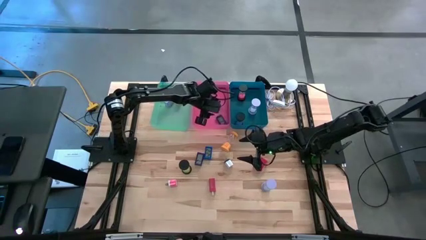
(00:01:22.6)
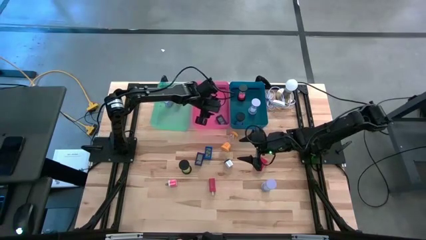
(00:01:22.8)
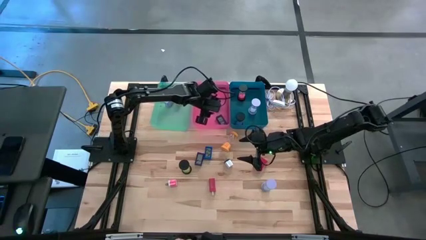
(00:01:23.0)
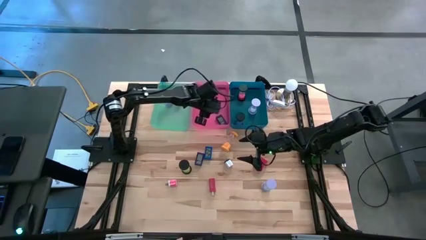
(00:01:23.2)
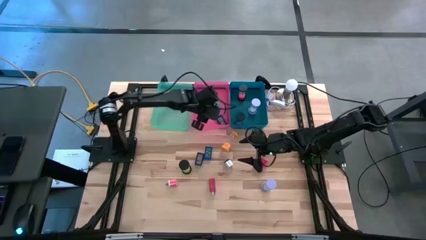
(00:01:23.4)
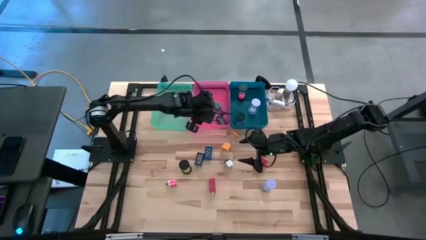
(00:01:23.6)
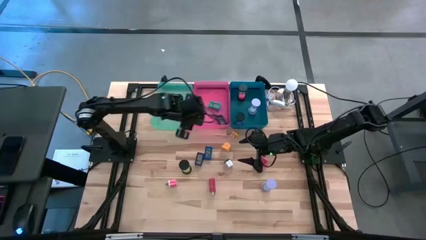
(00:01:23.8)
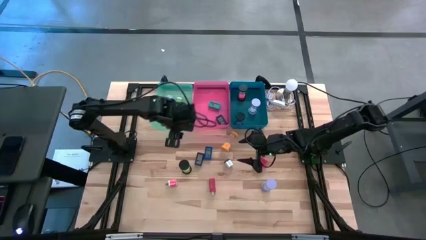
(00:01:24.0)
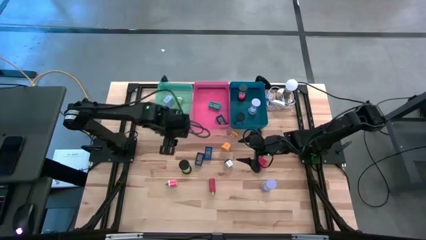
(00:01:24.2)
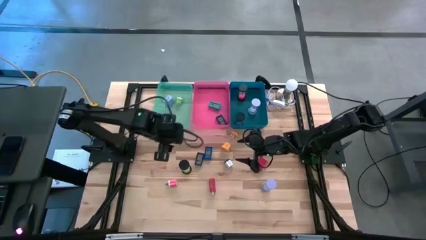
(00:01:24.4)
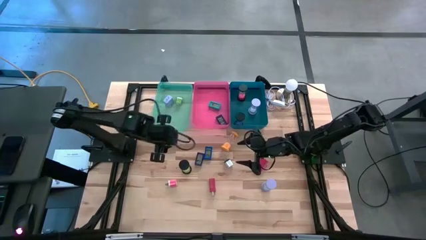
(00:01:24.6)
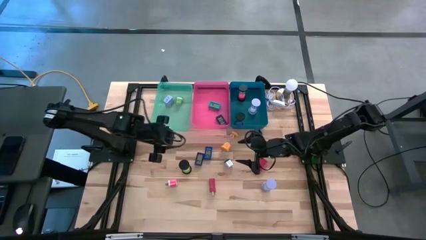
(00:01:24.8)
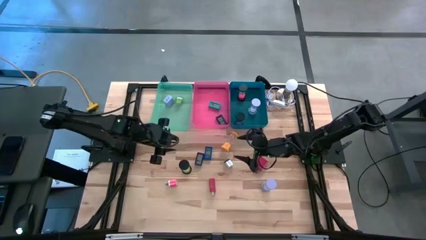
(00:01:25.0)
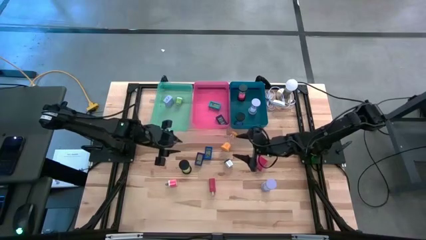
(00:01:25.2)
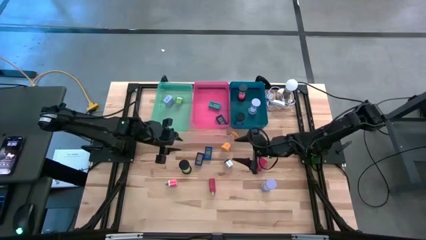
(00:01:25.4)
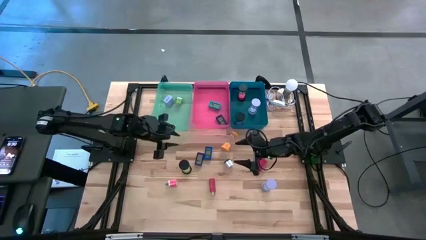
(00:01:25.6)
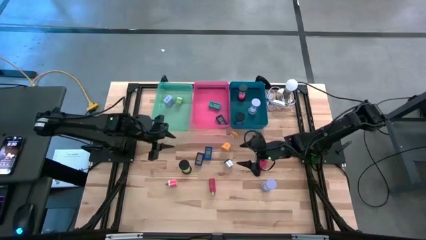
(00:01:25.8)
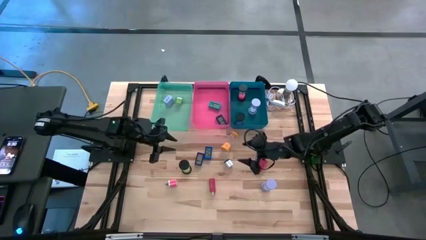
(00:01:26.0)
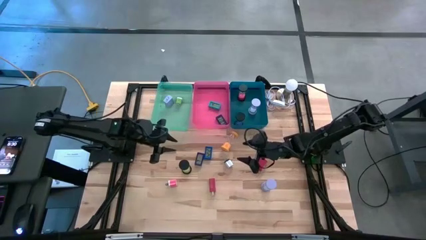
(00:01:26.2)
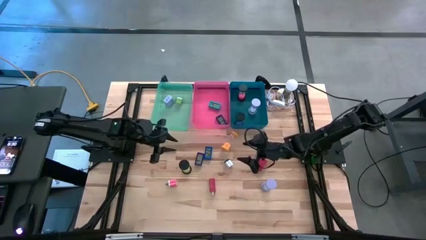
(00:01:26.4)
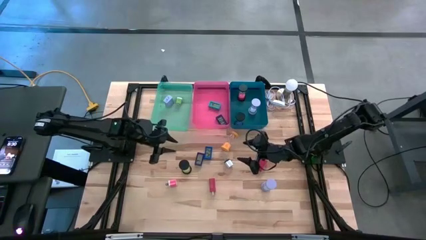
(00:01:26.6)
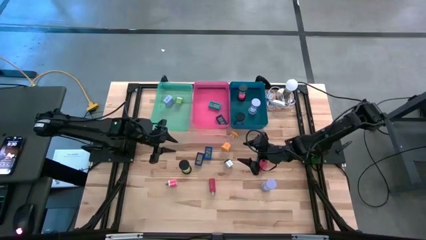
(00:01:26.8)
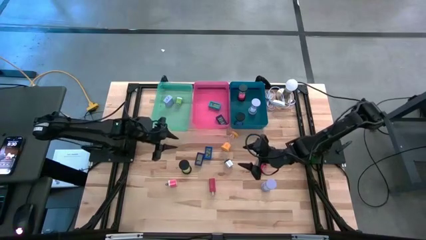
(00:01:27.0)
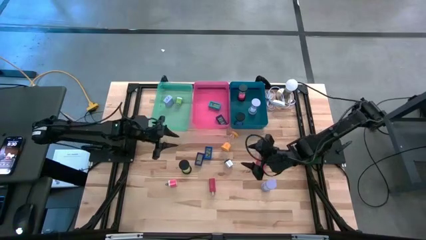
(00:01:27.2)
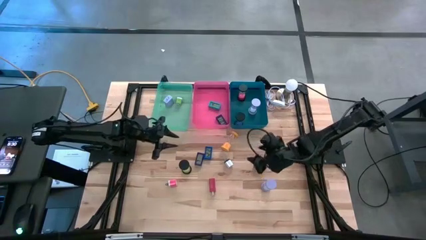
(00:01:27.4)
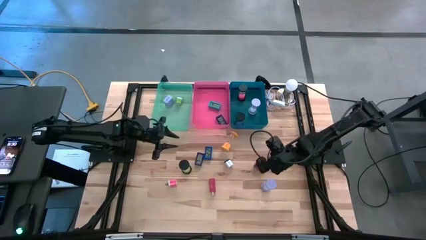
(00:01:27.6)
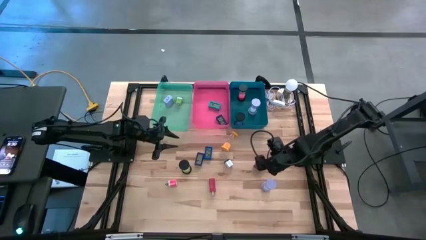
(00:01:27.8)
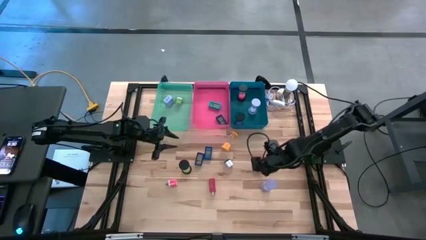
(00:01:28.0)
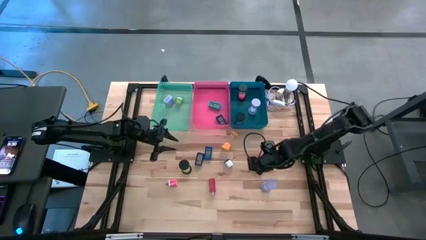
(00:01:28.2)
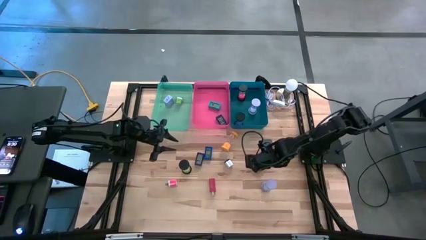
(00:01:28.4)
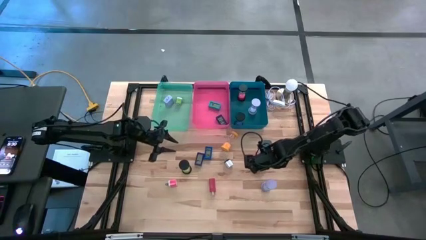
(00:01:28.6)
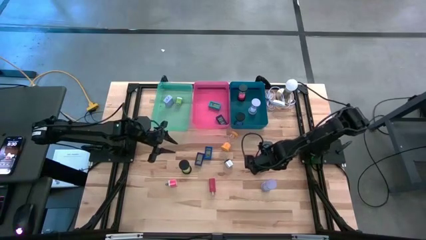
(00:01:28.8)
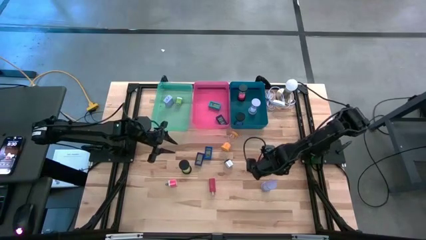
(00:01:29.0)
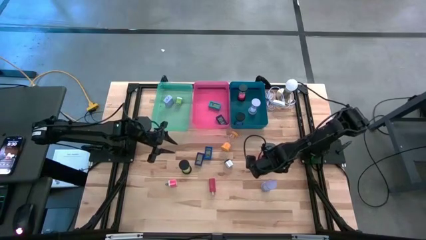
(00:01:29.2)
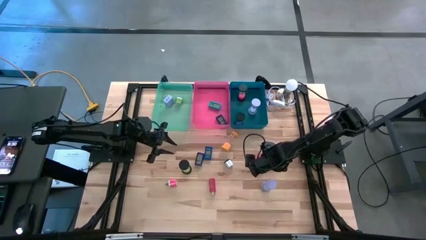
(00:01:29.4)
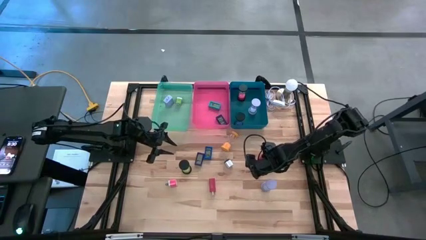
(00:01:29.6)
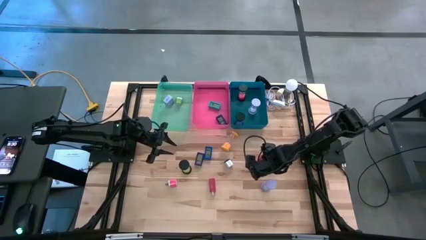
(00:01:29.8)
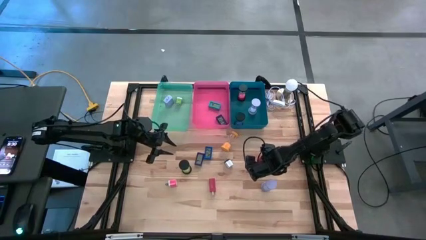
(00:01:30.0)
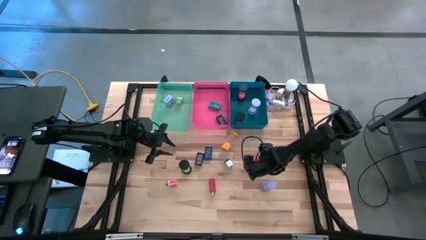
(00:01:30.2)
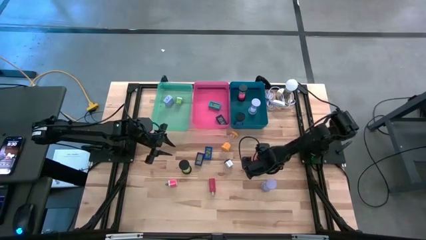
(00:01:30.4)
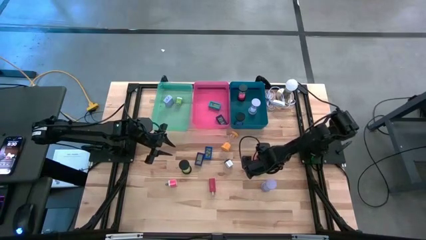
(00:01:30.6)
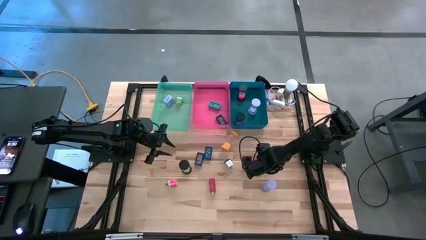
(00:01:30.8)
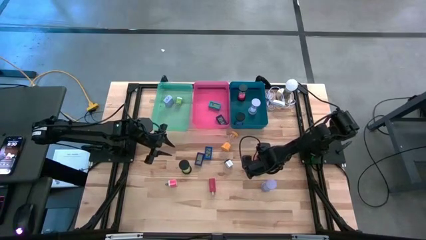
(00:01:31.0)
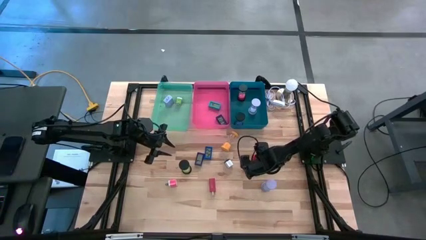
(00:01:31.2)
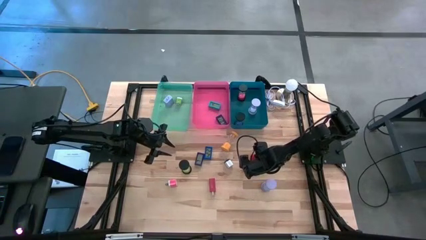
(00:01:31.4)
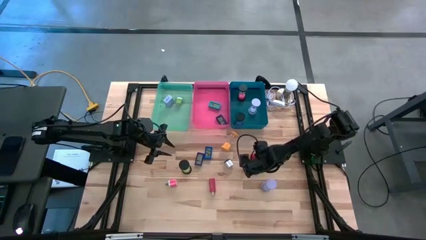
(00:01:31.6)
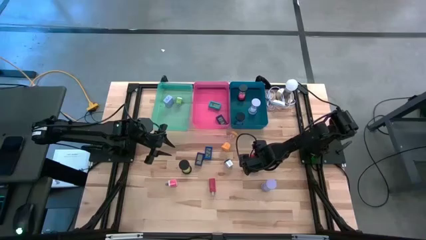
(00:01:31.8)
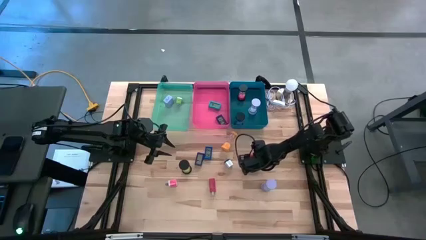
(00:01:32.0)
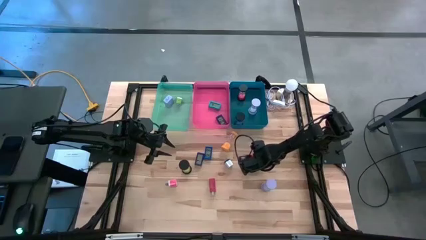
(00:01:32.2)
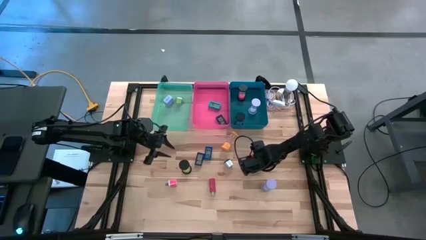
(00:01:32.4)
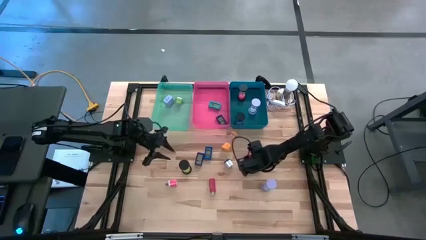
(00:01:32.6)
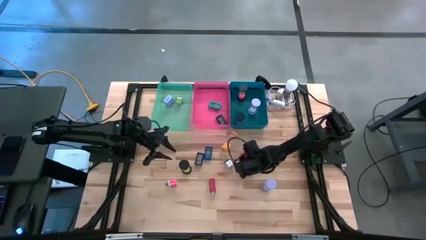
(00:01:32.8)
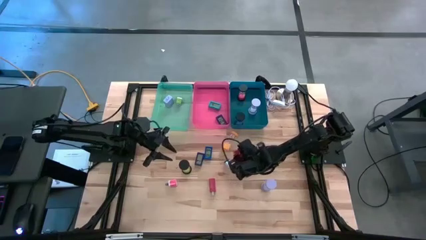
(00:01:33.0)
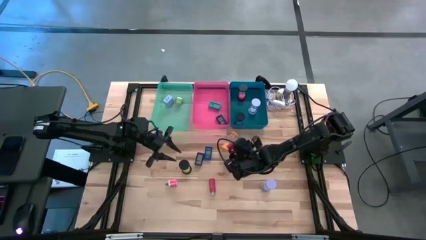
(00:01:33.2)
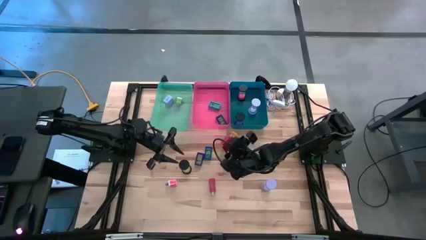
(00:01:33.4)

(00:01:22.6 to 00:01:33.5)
Task: Pick & Place Office items
Put the right red adapter into the green bin

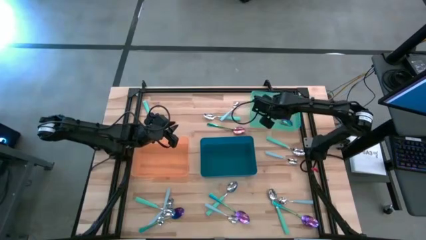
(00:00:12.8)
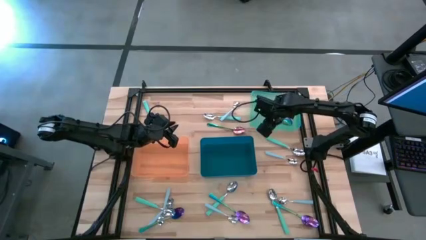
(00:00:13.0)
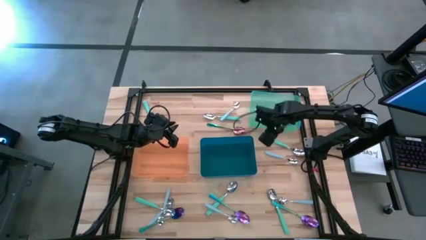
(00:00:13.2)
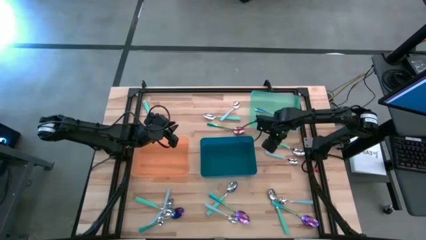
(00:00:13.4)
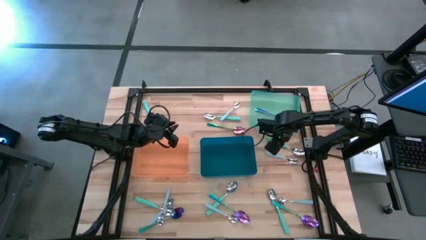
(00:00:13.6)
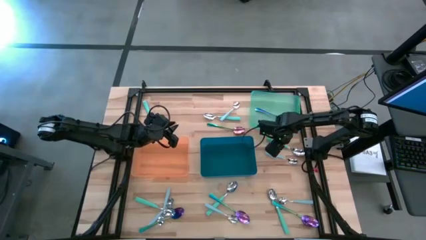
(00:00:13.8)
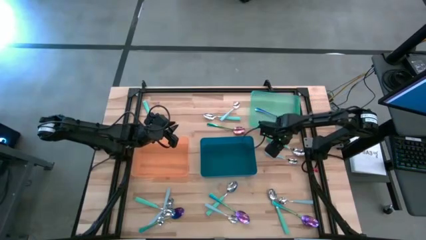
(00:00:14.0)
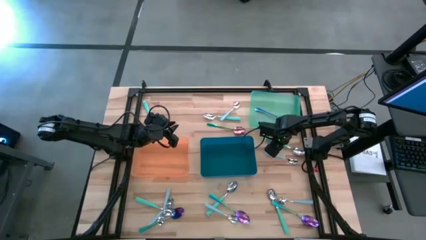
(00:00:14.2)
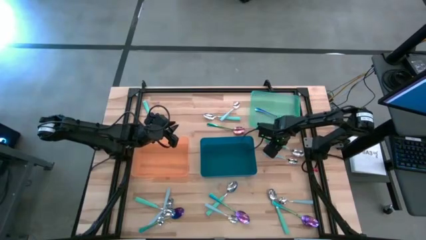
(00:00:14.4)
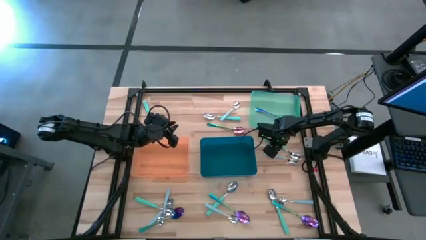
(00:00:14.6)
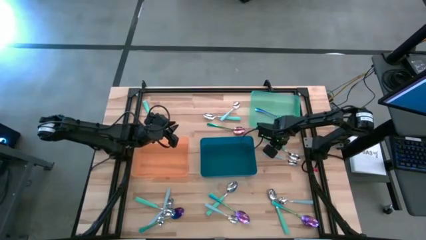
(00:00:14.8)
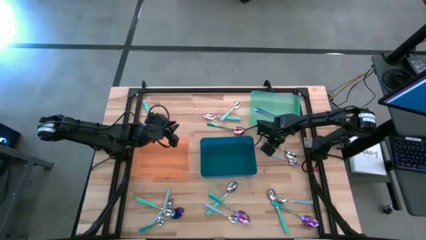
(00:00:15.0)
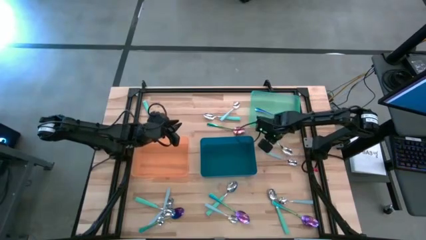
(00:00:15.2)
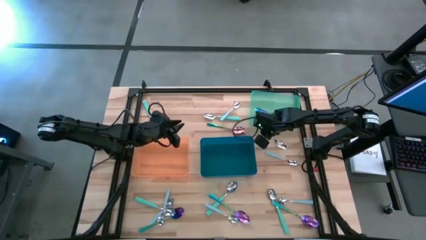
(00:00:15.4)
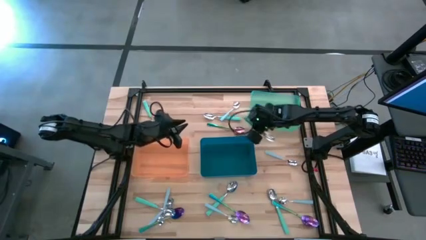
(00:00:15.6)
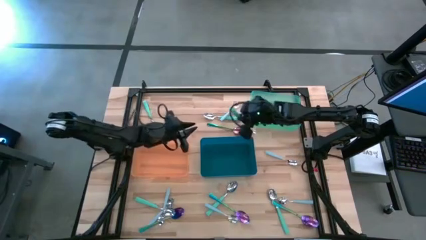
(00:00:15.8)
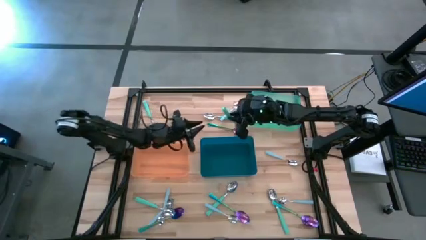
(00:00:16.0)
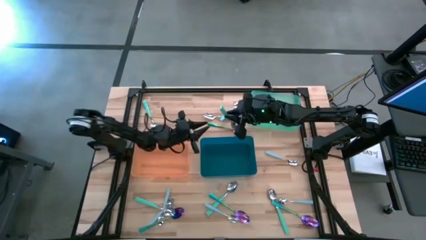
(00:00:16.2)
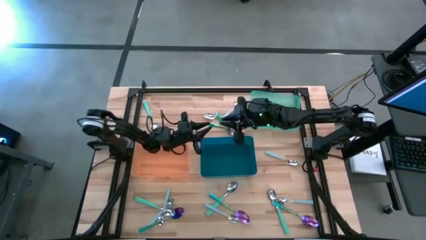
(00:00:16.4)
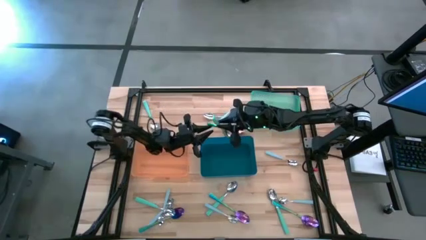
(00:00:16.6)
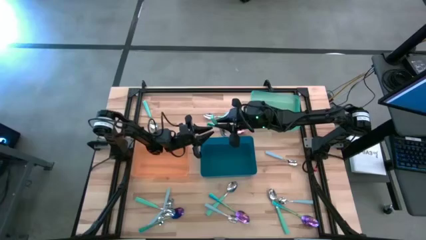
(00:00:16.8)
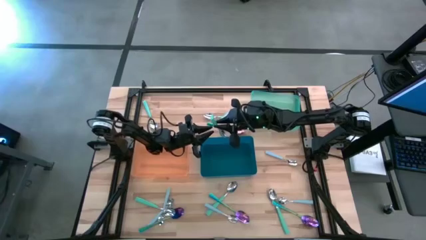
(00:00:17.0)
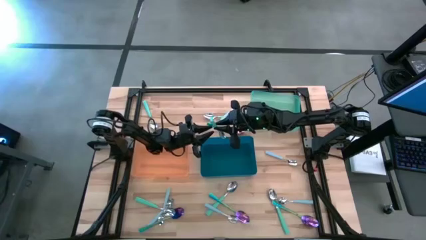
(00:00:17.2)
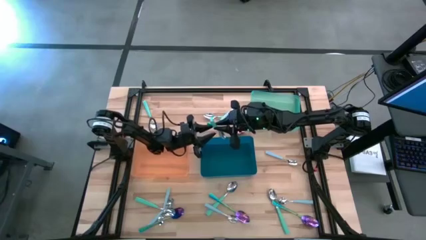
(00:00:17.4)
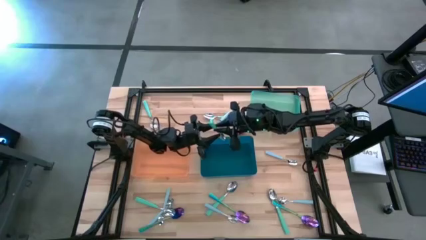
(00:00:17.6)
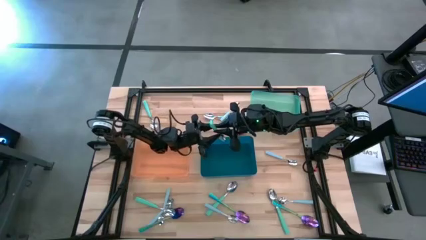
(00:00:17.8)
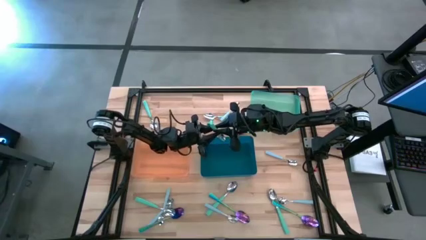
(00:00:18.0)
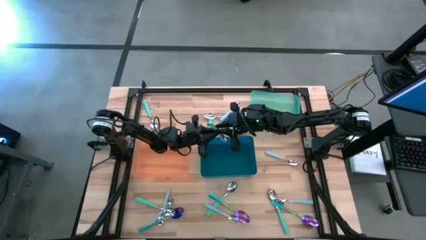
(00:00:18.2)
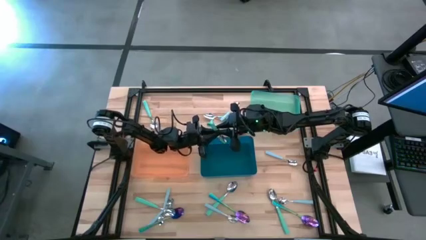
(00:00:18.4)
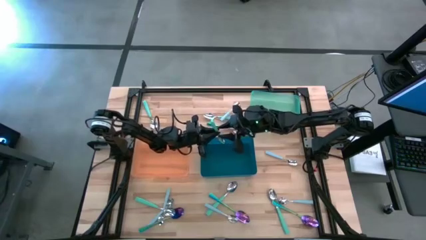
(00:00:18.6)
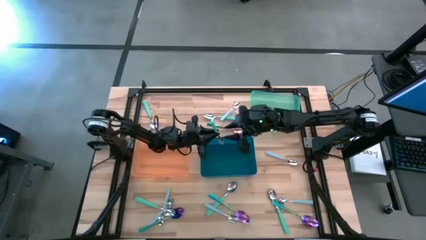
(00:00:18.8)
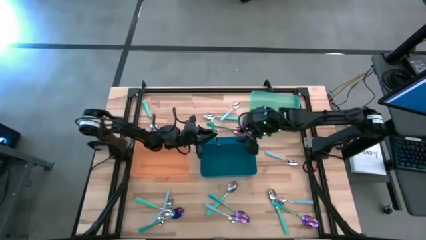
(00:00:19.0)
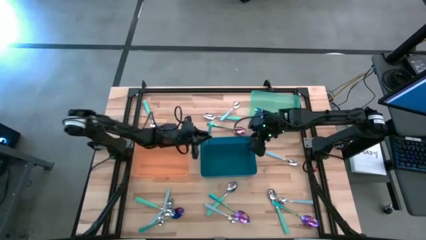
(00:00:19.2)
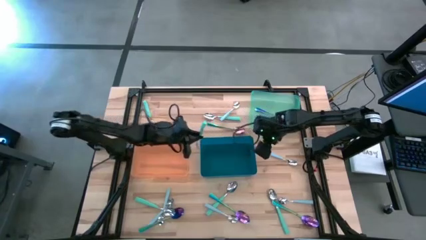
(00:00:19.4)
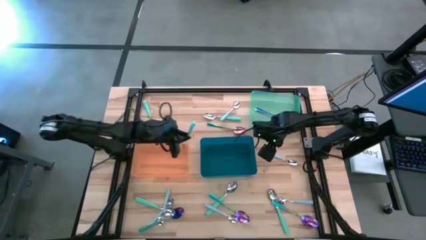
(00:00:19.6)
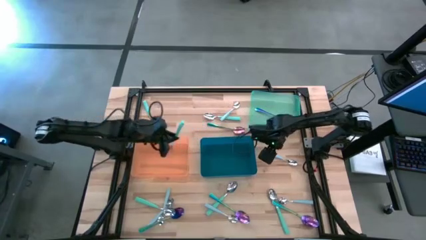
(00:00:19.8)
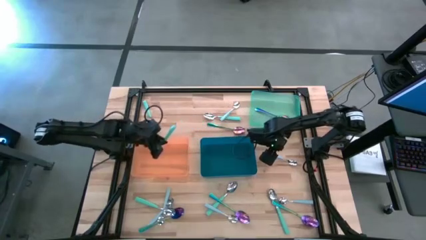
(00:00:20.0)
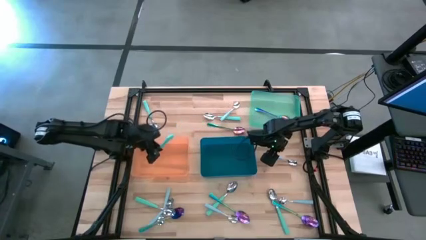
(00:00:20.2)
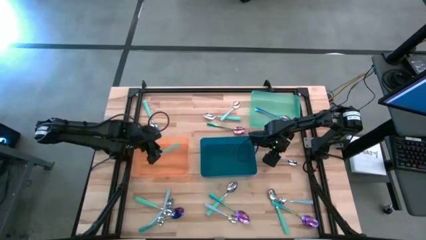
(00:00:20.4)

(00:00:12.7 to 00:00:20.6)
Task: Sort silverware by color (type)
Put the light green spoon into the orange bin
